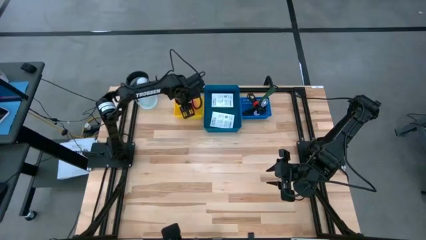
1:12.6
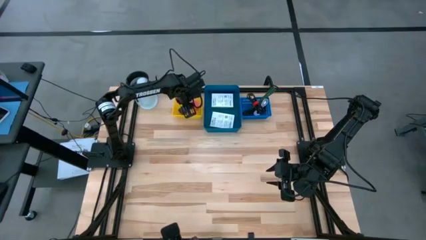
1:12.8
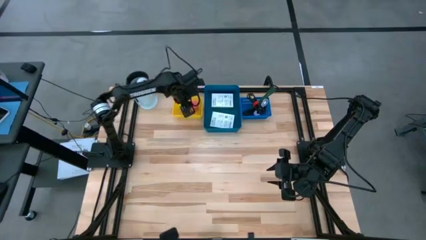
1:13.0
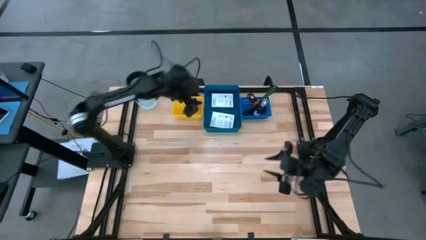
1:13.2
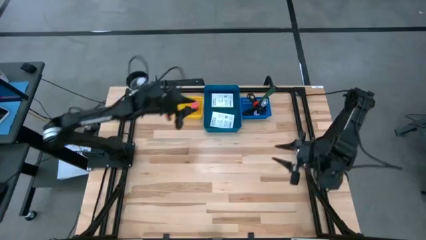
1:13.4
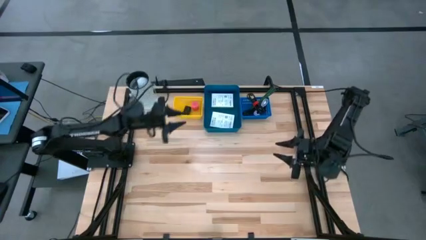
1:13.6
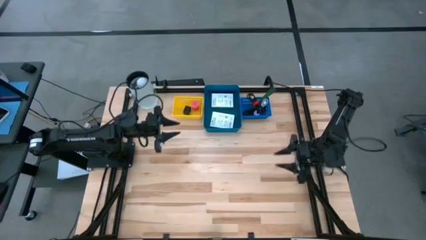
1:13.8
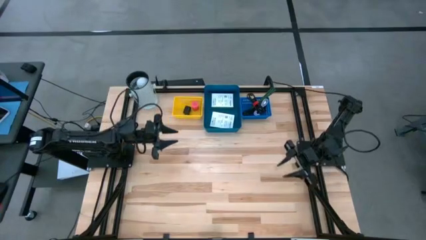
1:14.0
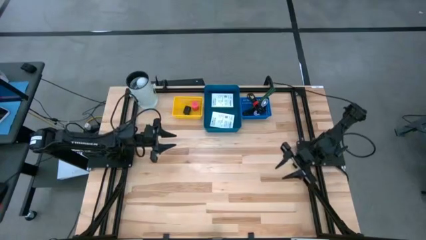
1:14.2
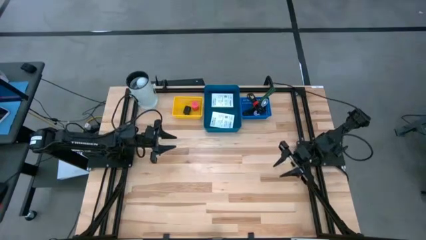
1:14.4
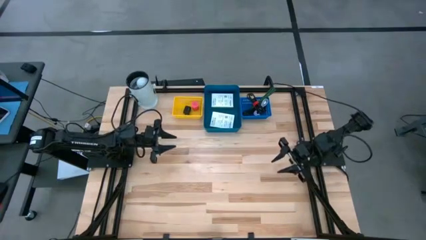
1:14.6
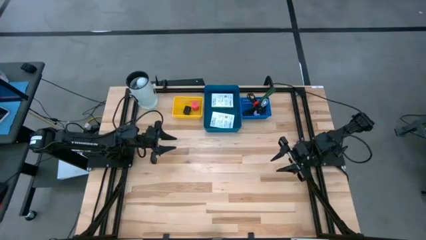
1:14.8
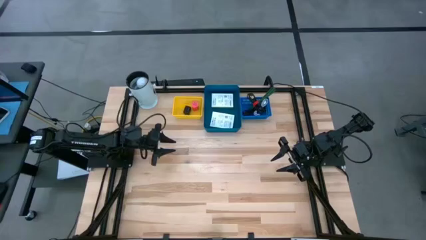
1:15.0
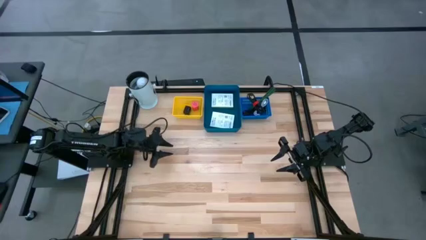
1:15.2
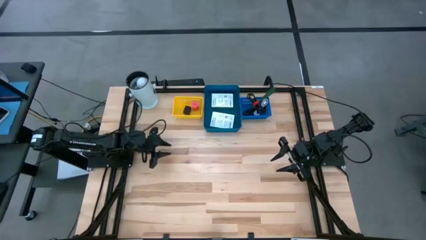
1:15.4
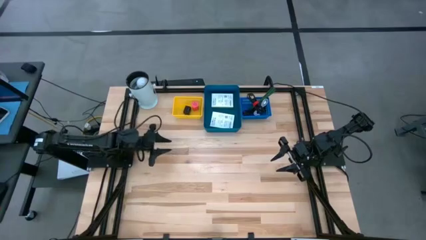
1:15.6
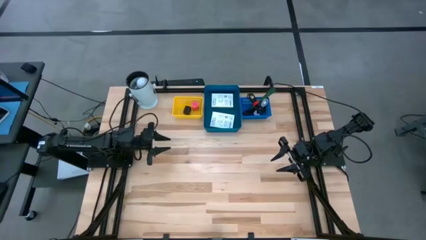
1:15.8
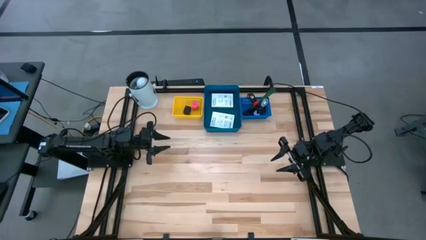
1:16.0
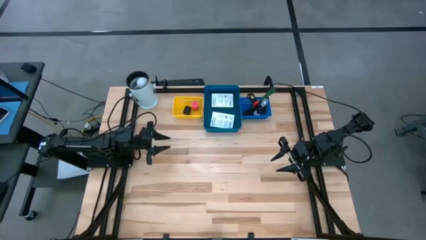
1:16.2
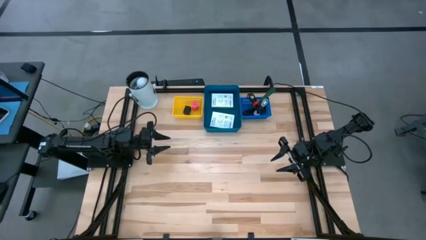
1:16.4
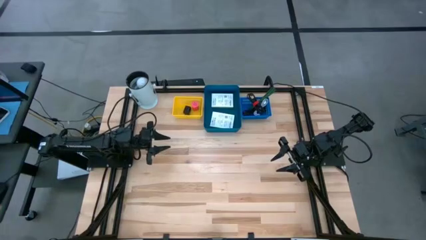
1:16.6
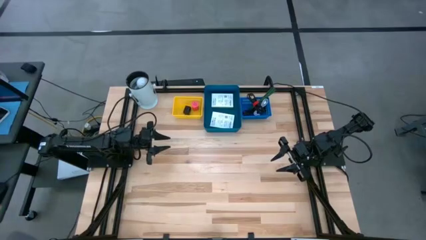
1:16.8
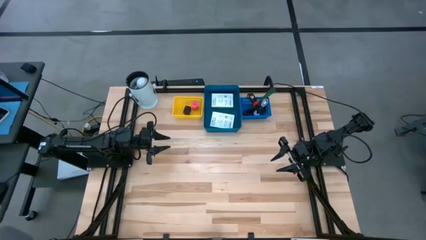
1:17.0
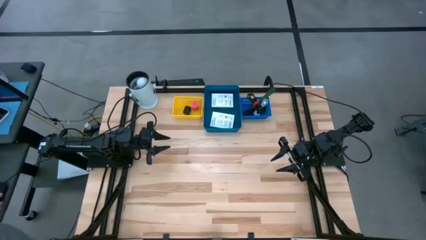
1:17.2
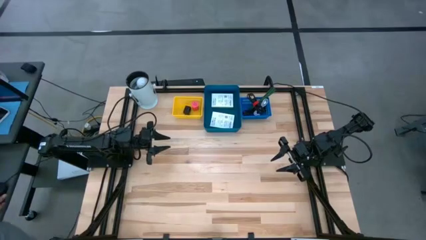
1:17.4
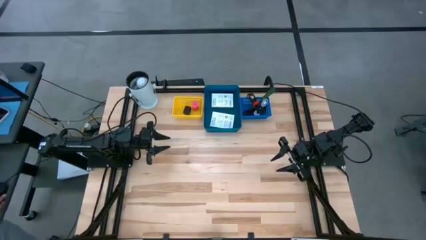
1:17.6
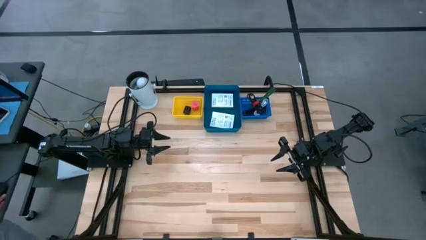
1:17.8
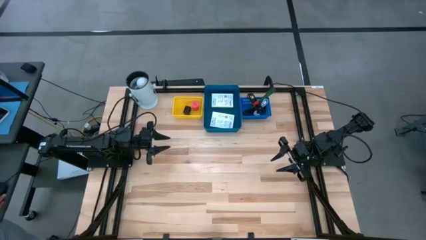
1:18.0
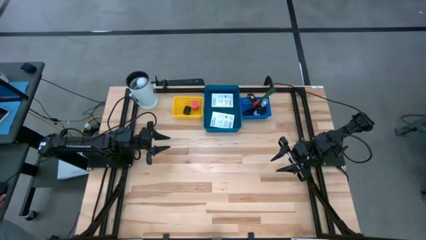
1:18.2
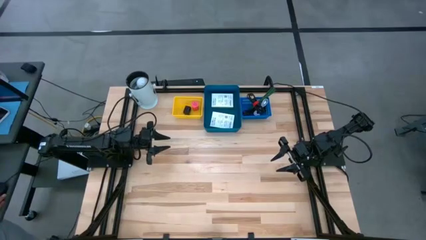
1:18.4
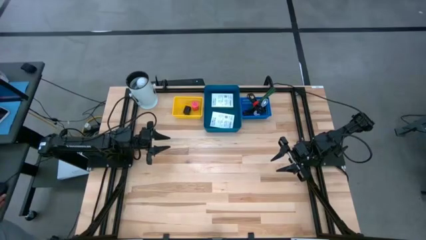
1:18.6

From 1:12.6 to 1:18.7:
Task: Pick and place items into bin
Return to Home Position

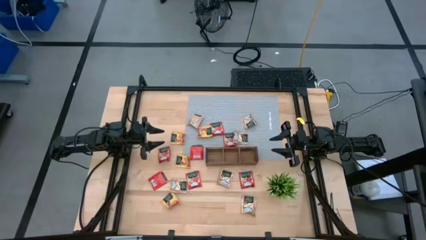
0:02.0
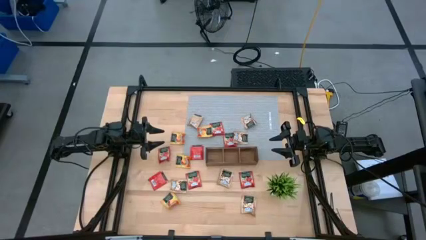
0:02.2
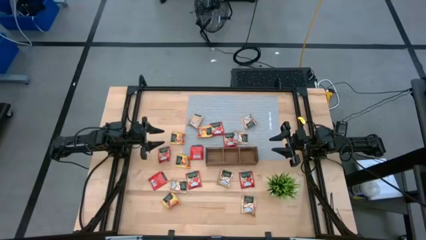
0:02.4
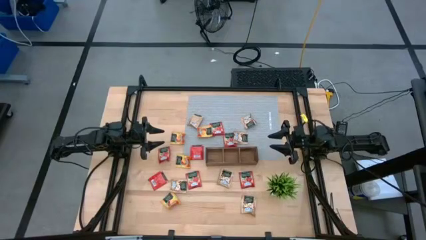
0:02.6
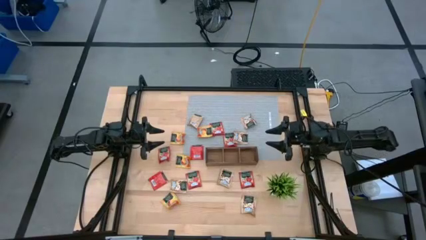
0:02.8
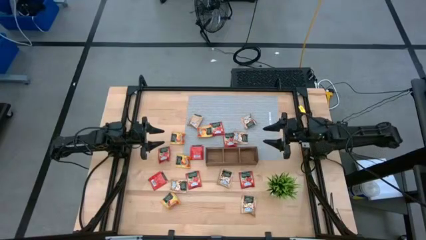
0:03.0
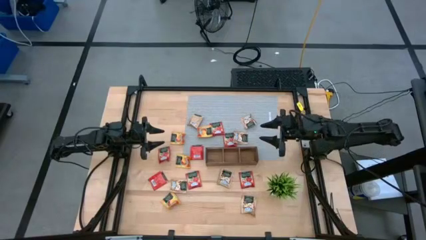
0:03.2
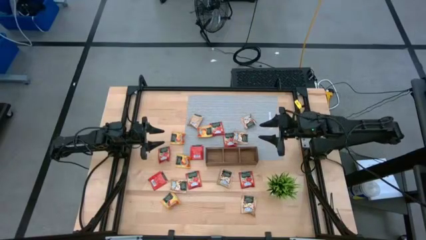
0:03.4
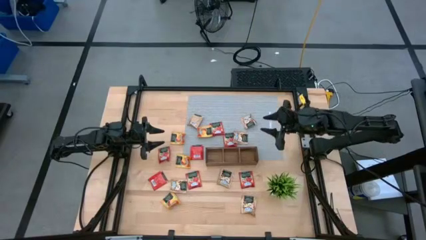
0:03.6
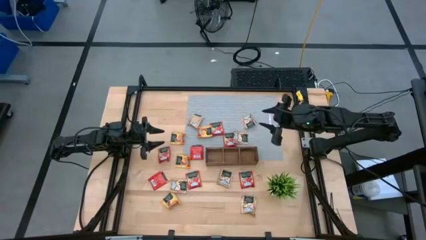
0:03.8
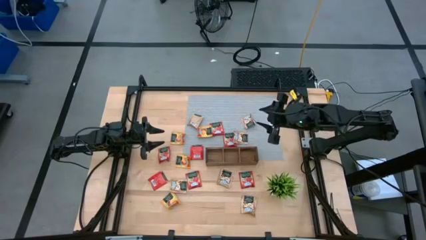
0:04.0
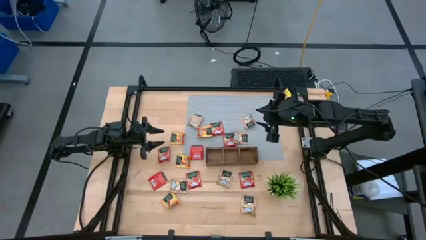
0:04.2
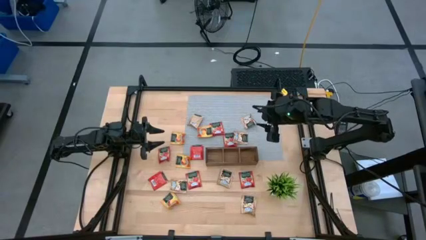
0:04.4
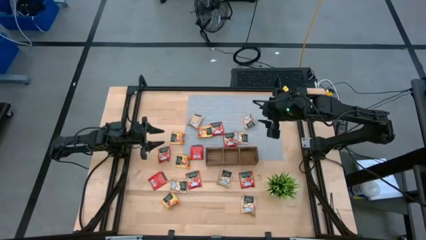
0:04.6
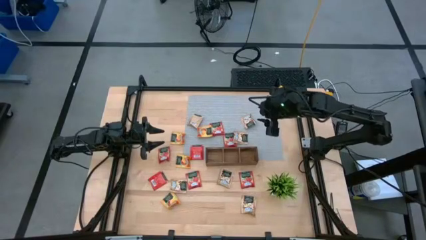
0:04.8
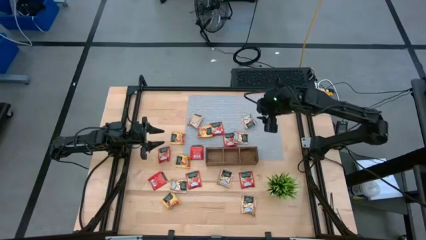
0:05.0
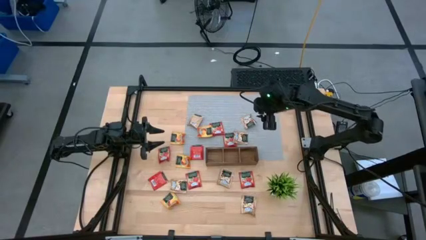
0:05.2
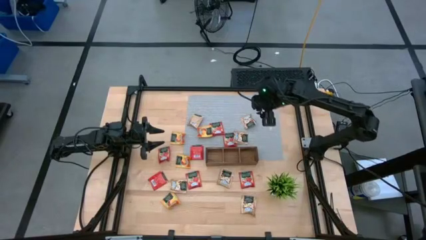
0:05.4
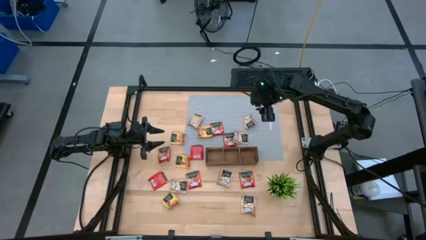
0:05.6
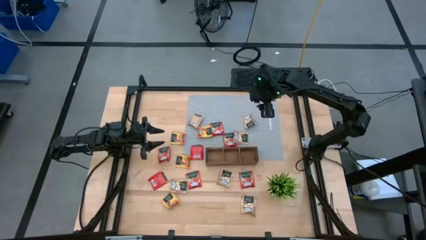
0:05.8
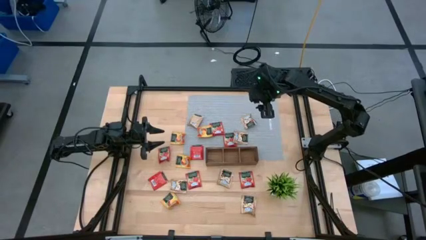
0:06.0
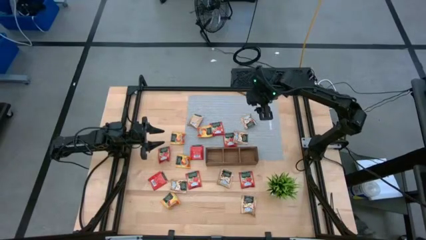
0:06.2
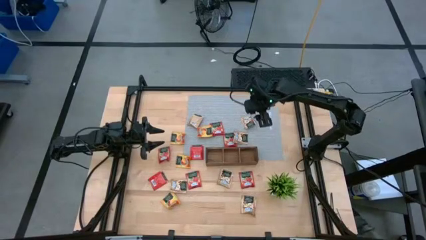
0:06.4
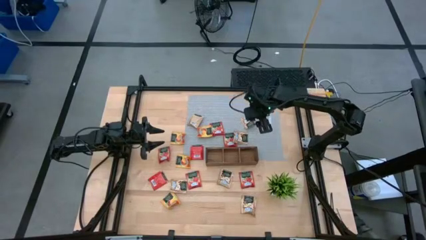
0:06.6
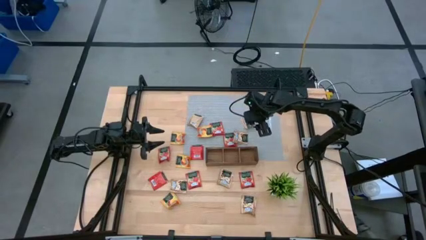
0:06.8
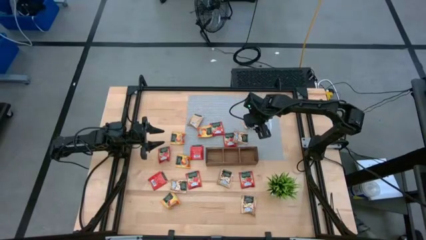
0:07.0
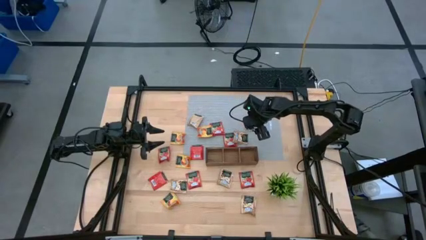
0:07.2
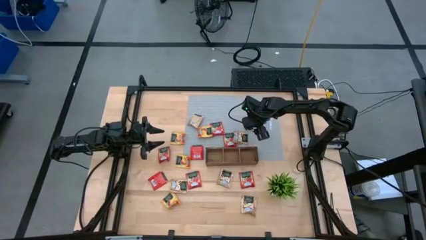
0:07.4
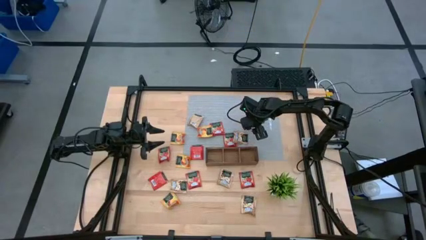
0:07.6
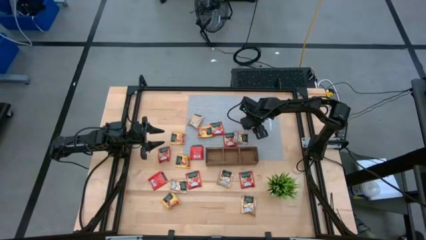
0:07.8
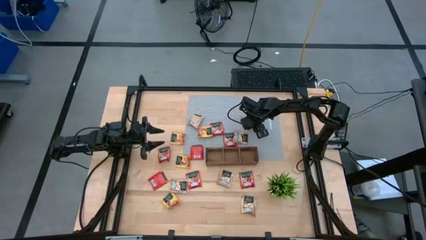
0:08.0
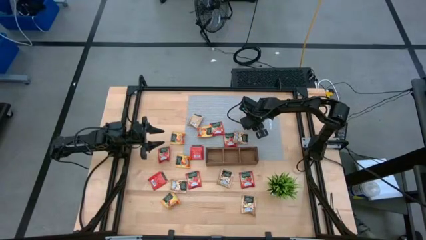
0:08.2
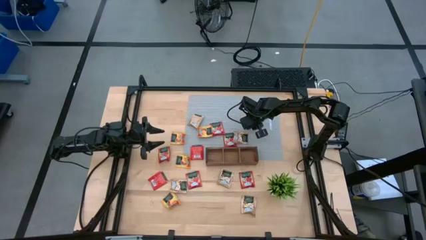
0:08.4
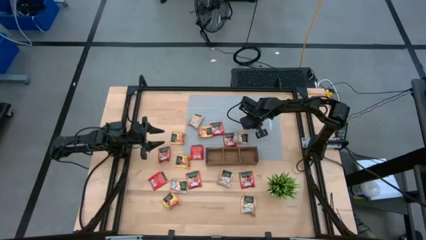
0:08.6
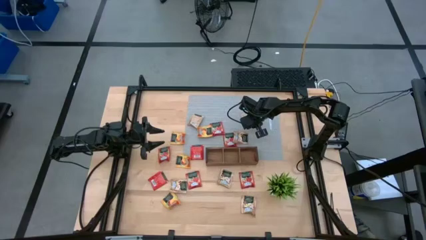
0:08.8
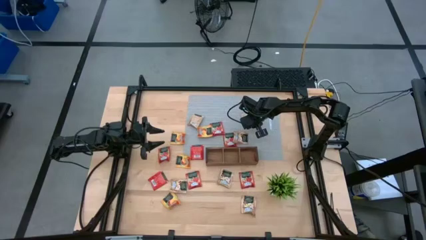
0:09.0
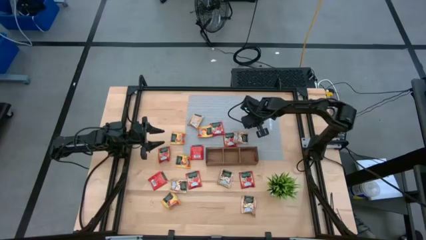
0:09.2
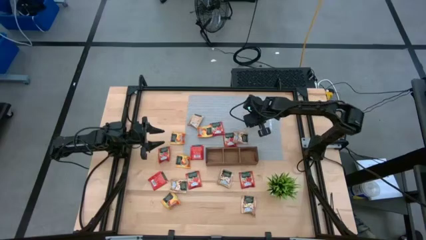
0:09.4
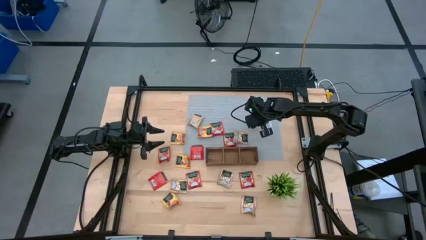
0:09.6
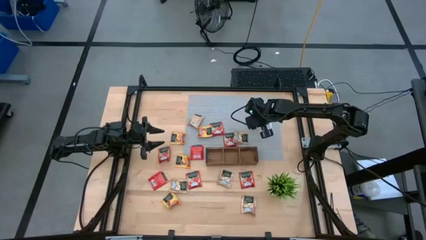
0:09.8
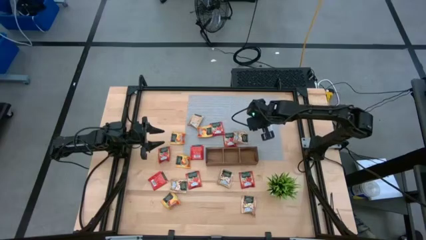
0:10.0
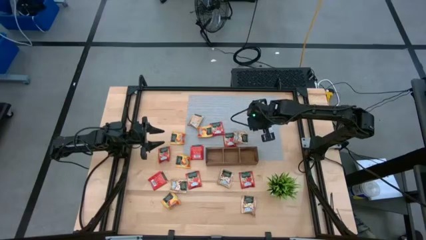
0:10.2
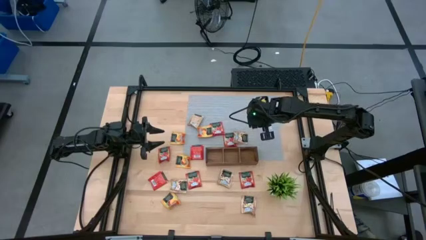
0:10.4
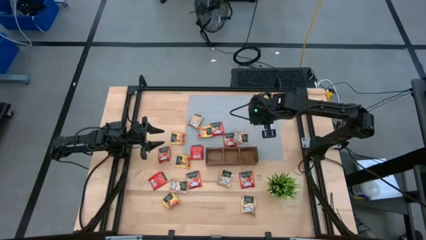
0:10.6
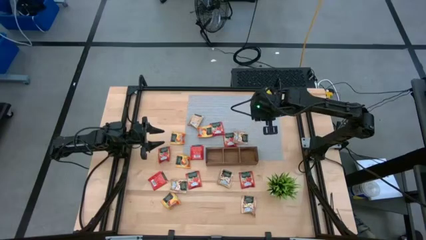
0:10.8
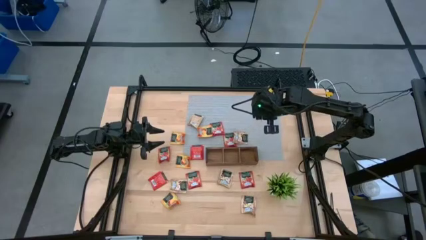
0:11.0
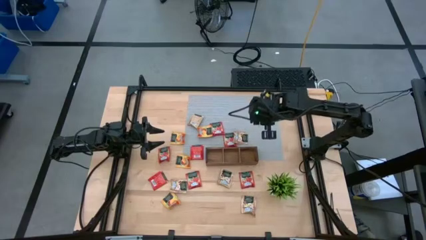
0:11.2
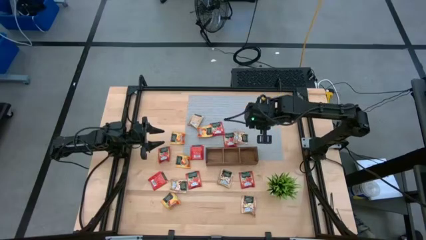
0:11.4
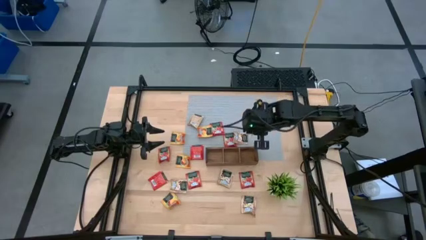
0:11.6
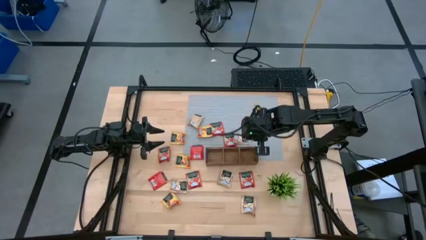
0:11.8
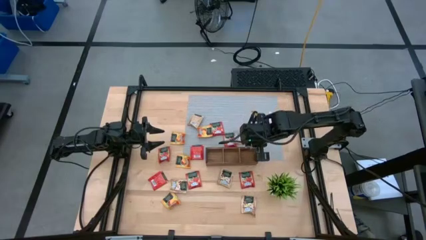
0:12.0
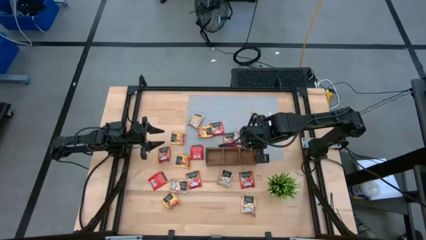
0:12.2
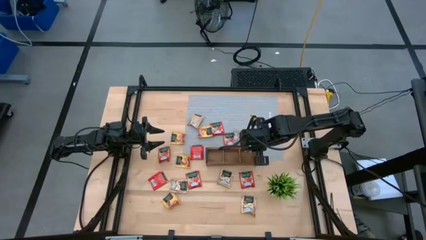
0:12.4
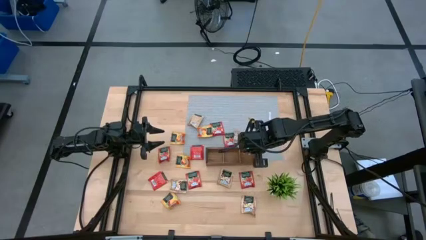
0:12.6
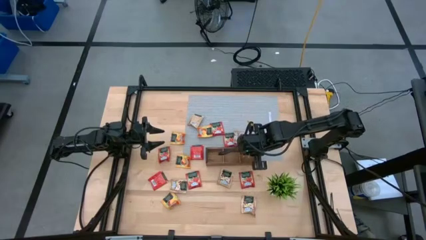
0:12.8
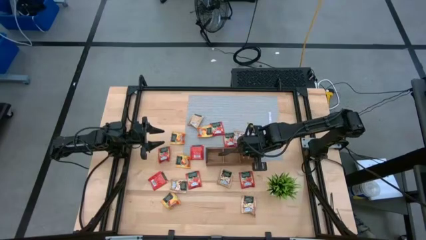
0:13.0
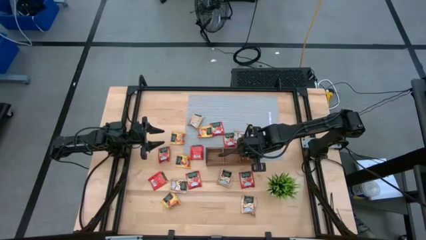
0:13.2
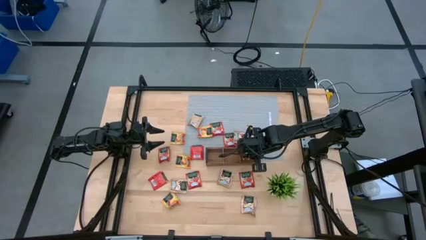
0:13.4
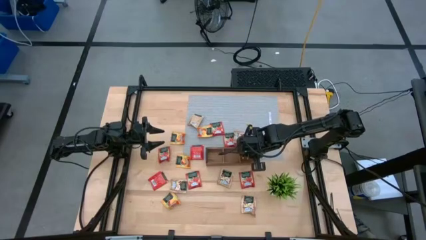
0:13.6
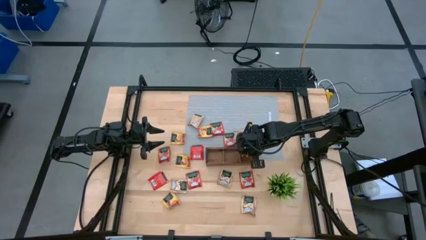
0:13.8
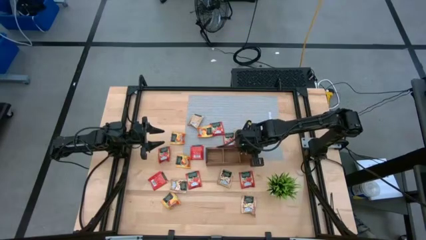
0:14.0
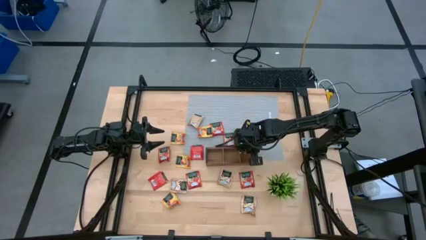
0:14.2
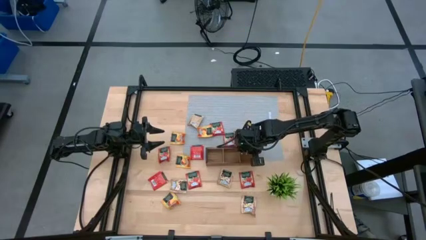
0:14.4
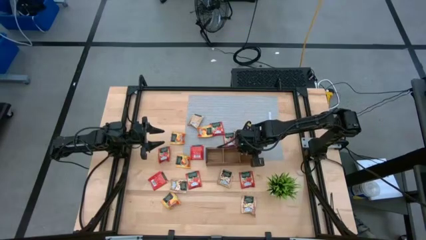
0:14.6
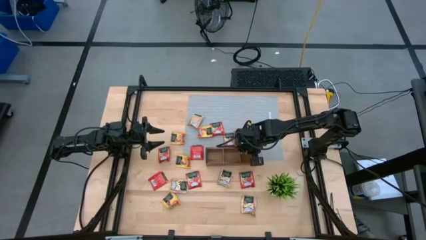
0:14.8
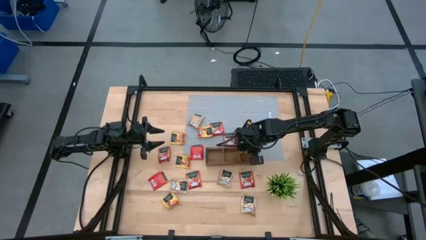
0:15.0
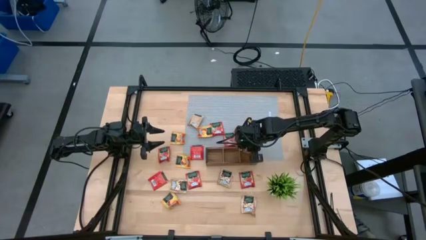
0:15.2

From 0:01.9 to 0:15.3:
Task: Pick & Place Tea
Put the brown tea bag into the right section of the wooden organizer
